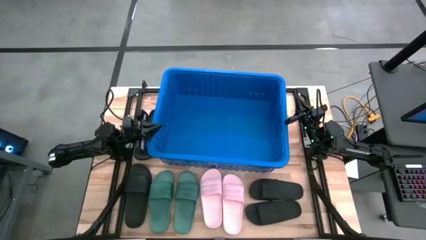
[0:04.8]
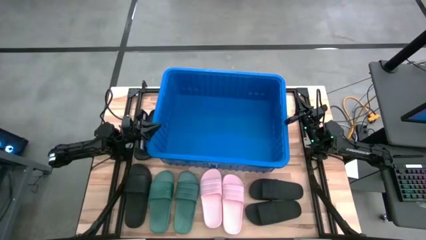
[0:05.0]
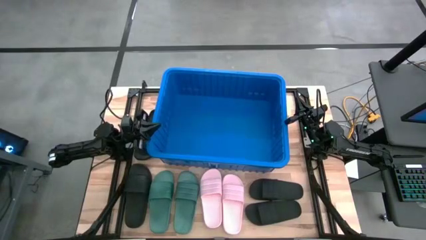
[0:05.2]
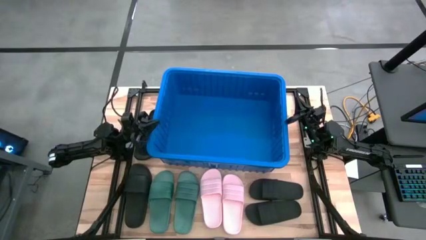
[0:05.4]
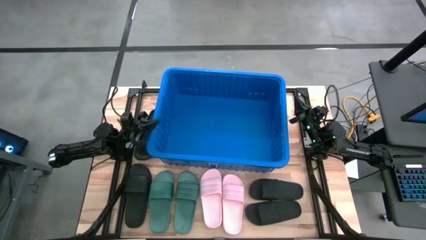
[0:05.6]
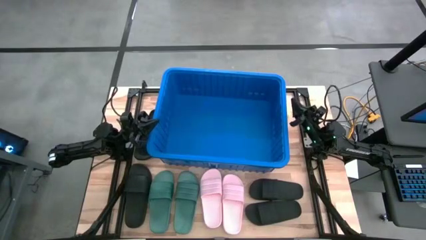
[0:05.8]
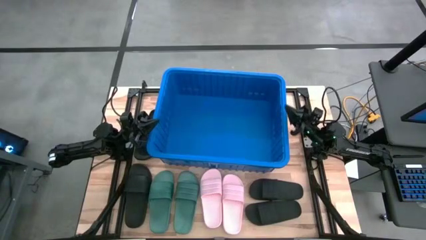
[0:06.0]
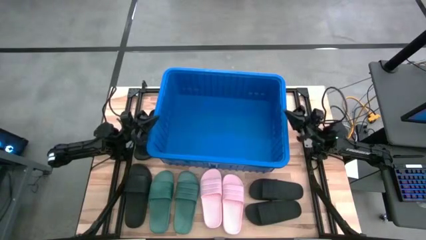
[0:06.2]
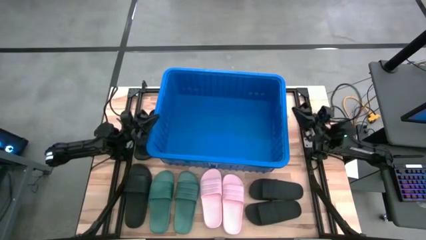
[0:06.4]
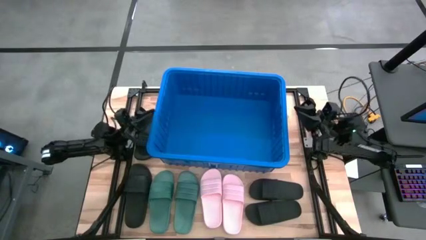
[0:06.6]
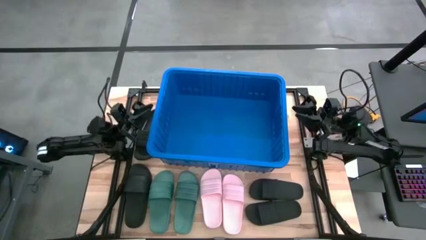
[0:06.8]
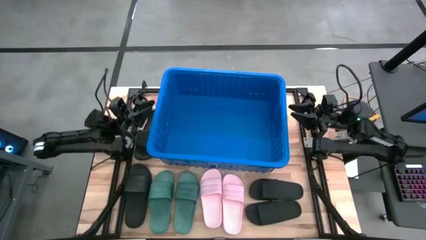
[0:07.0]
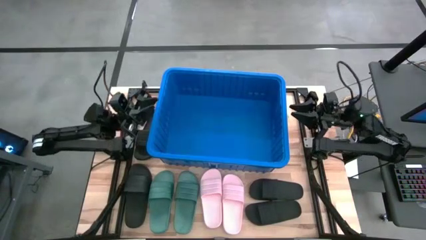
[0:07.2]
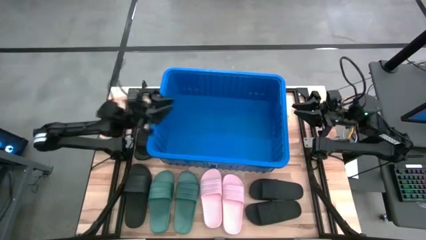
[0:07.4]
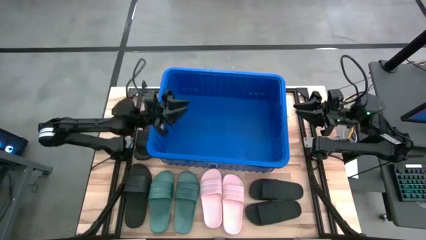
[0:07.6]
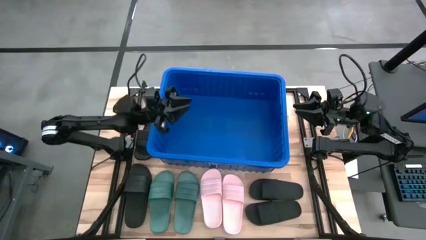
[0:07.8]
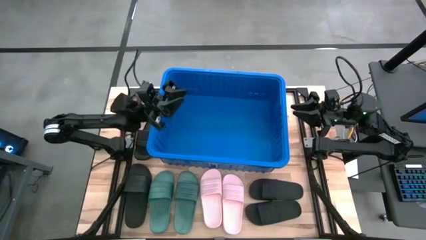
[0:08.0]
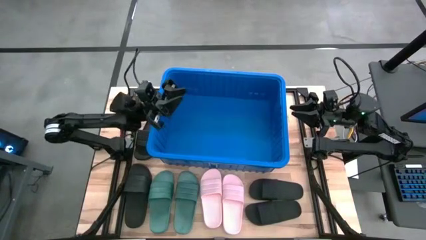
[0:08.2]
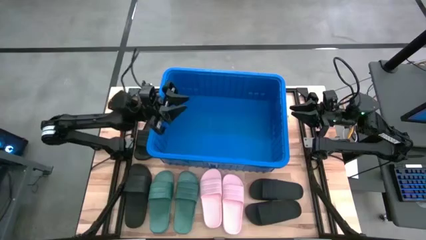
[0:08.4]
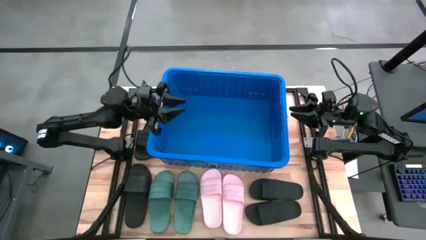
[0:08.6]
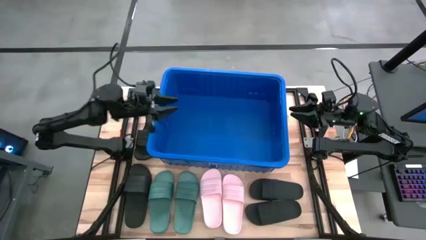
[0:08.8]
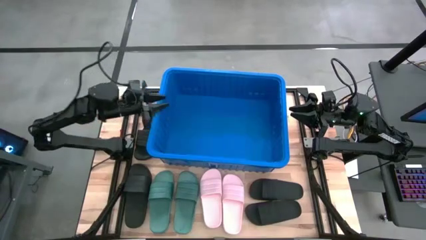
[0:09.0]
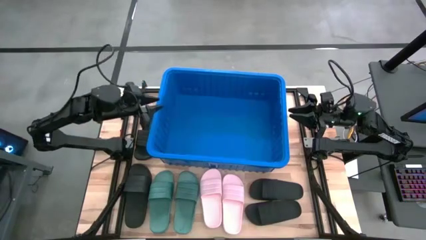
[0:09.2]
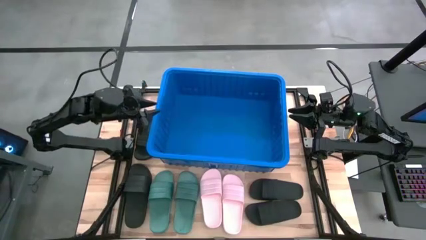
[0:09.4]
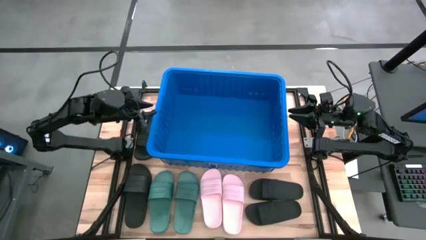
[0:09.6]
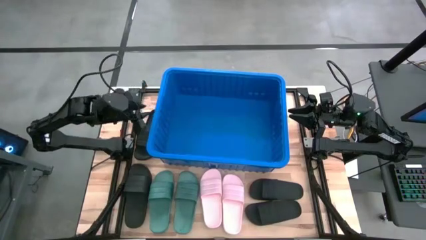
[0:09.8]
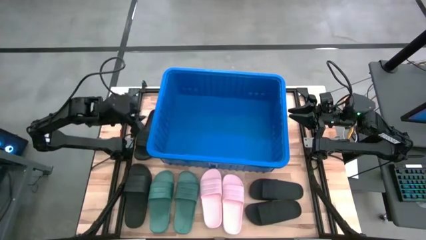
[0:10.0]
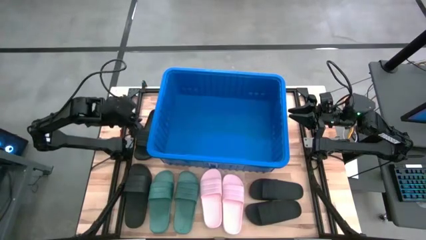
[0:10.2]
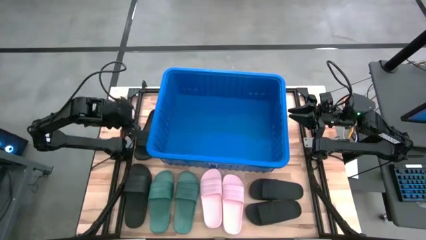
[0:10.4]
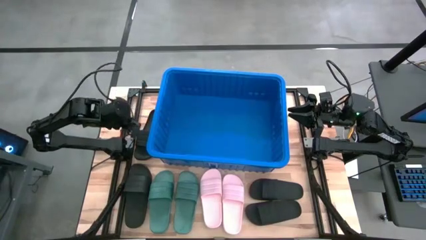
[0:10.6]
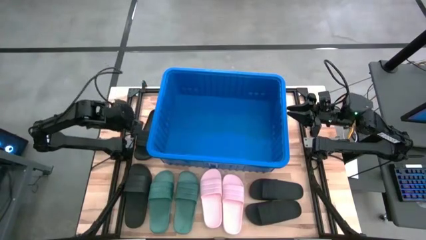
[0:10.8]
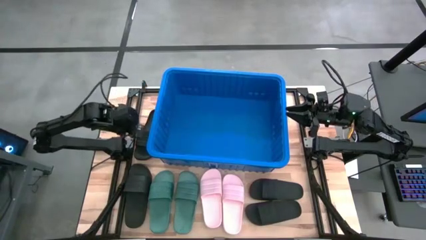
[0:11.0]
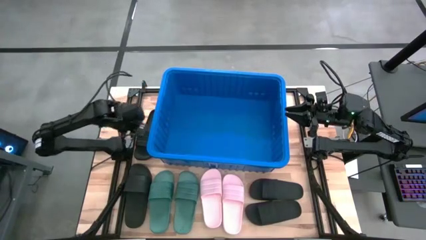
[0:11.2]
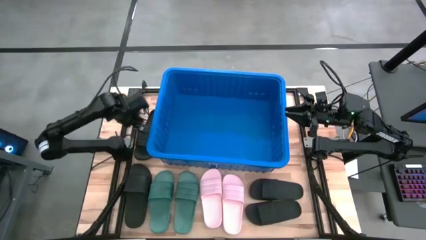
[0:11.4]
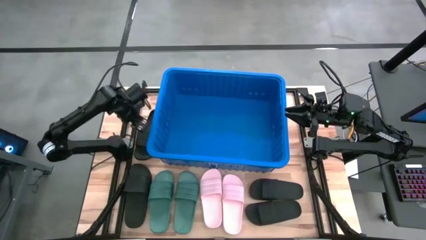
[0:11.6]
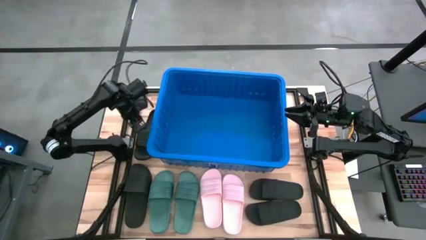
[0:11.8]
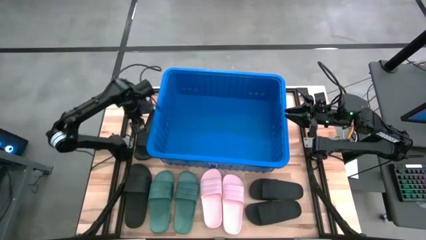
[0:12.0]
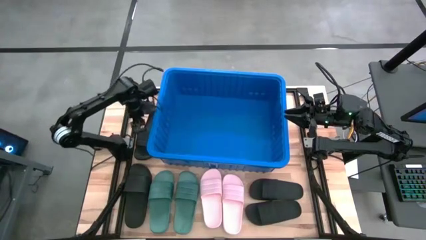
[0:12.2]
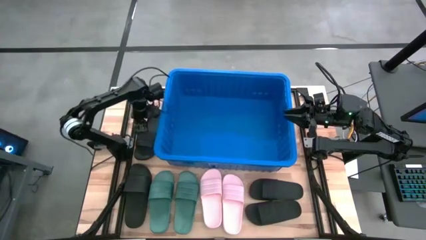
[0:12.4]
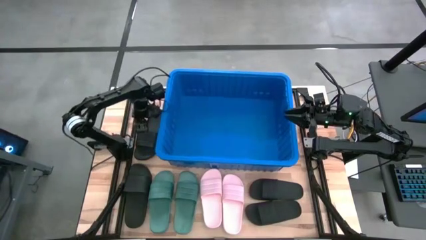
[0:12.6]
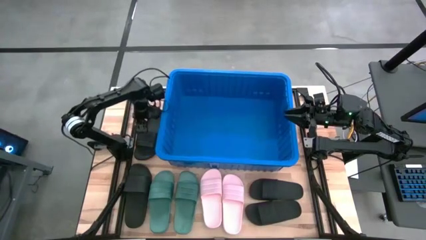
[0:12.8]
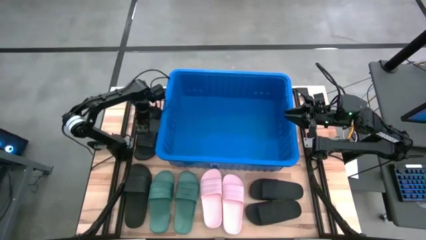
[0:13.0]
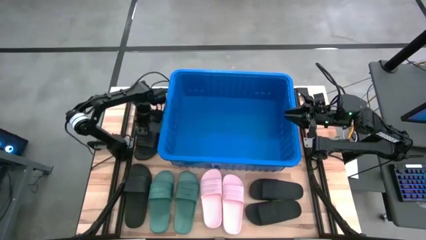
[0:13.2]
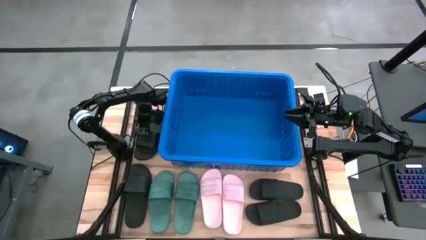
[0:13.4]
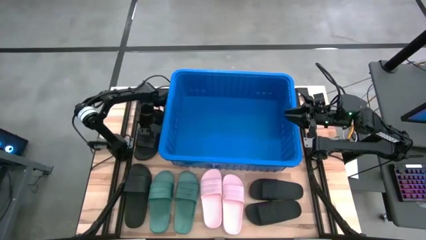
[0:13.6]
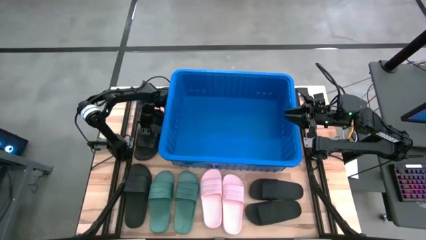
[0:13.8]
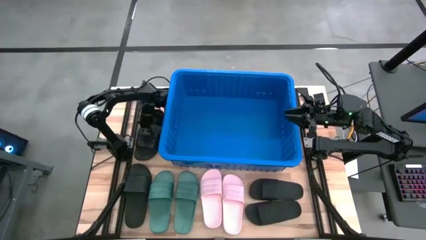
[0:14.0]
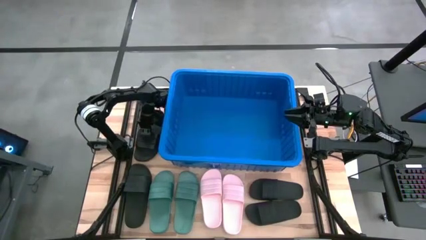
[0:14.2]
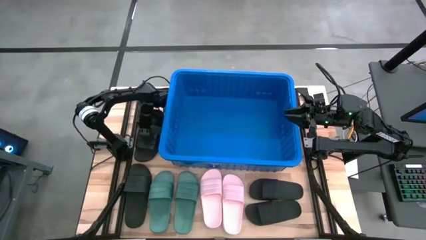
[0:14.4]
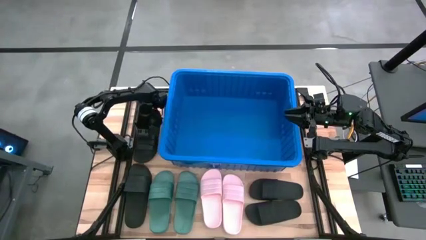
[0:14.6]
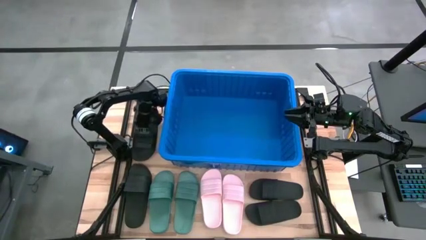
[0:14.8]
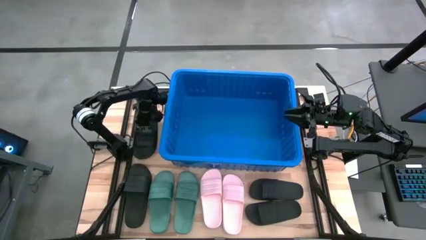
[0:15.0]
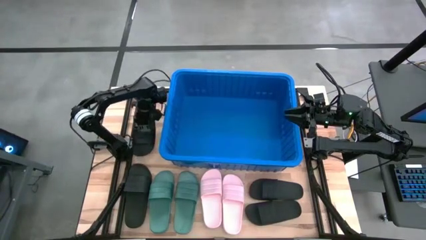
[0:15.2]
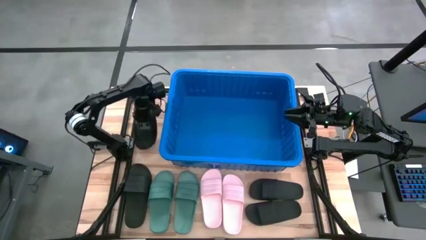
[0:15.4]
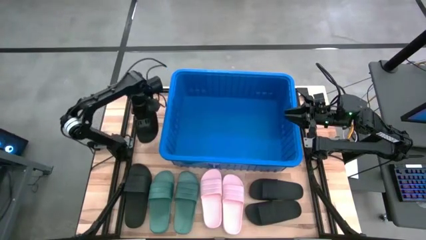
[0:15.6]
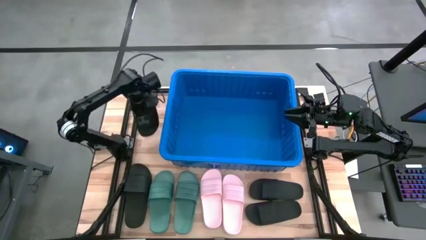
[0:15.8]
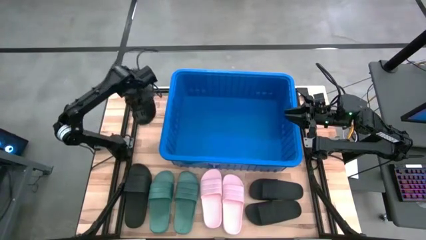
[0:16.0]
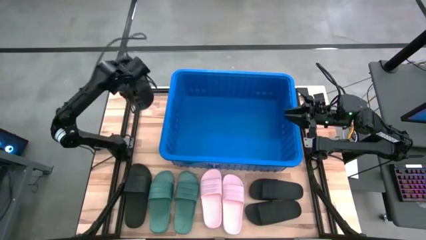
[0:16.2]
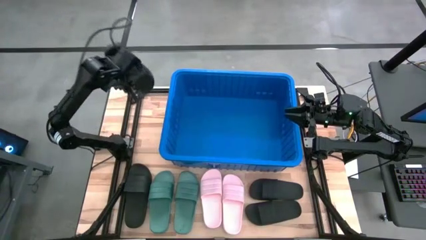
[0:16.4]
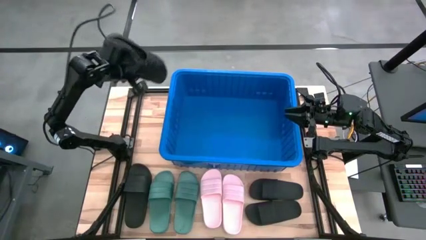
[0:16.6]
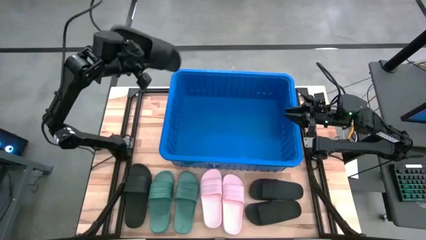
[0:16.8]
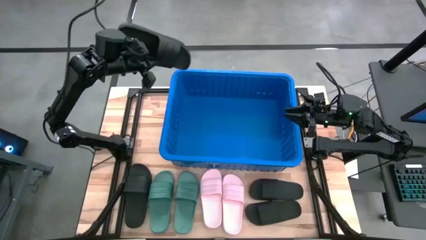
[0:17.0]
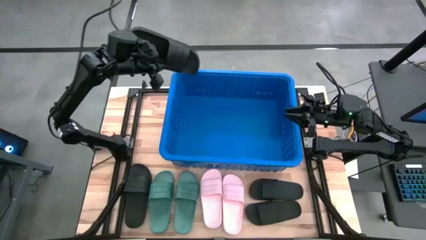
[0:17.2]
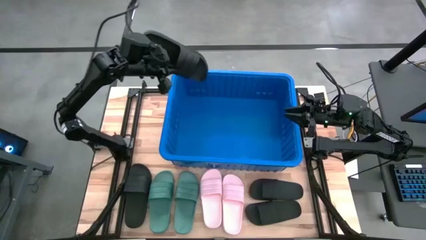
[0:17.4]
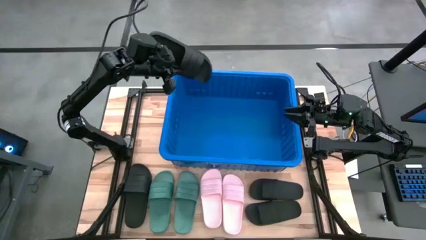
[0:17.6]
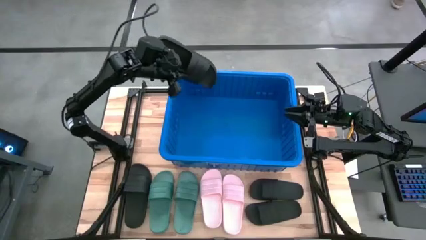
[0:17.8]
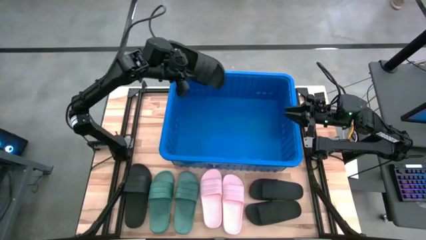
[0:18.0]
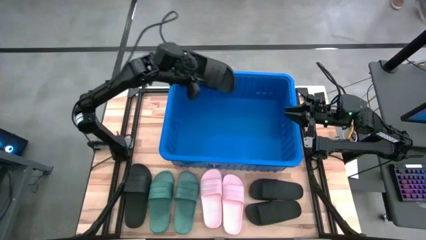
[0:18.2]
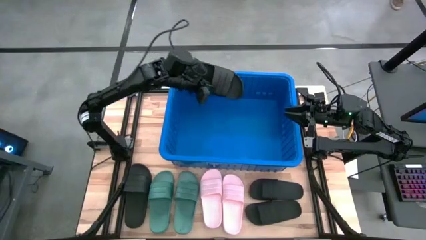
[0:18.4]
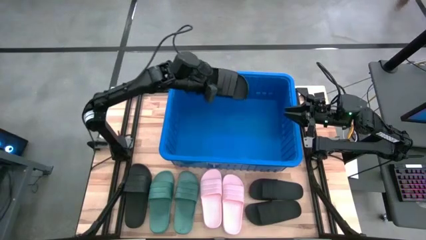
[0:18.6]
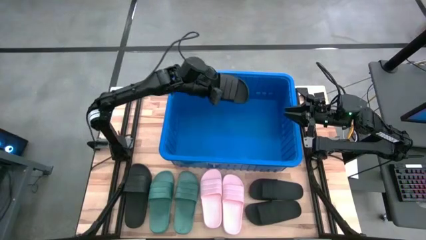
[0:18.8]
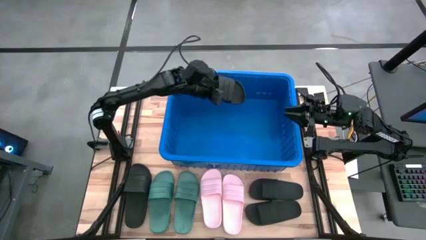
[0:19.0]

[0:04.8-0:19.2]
Task: Pick and place slides into bin
Put the black slipper into the blue bin
